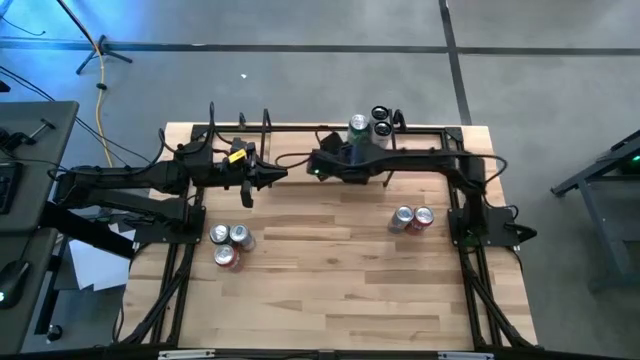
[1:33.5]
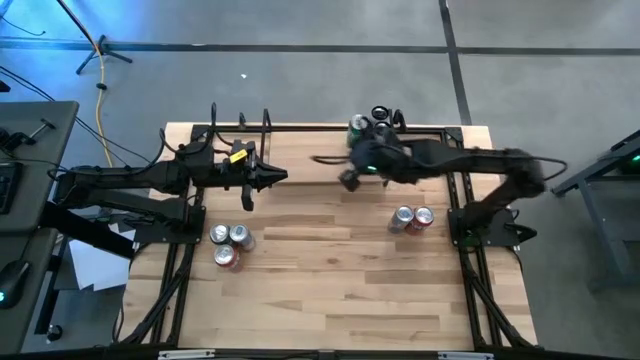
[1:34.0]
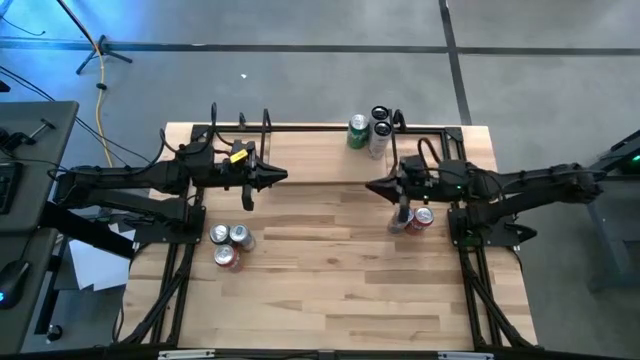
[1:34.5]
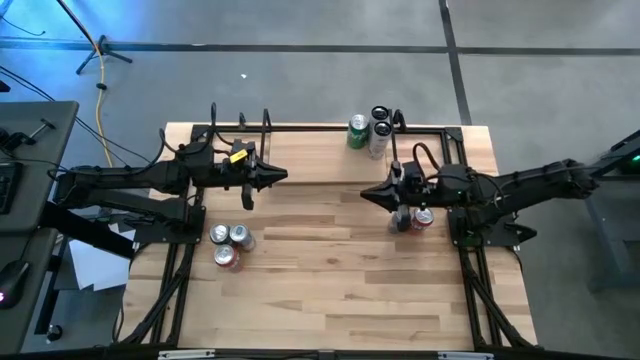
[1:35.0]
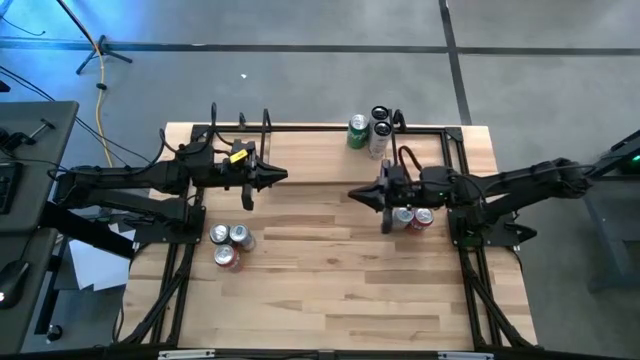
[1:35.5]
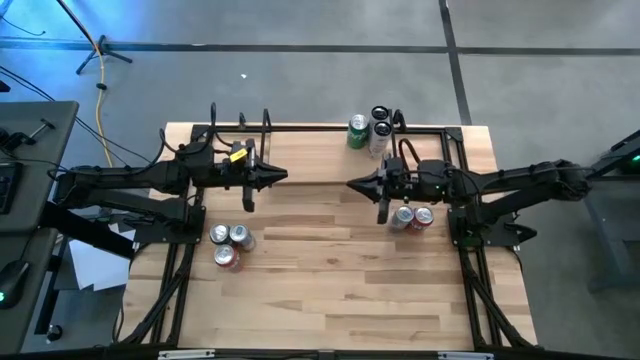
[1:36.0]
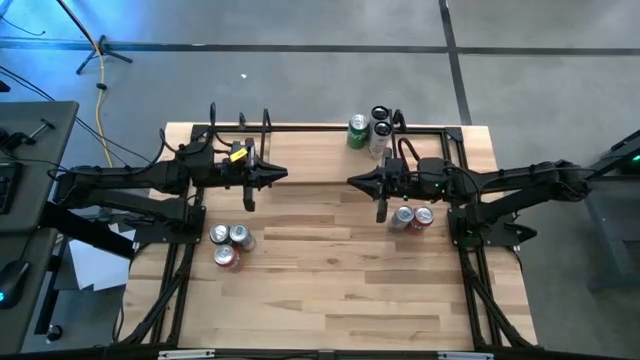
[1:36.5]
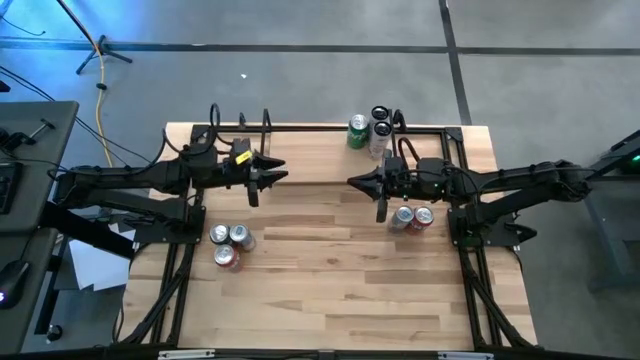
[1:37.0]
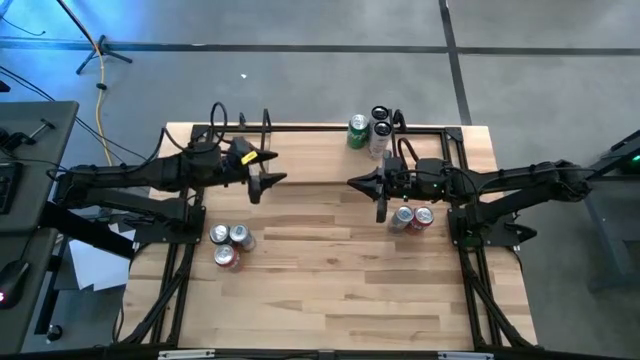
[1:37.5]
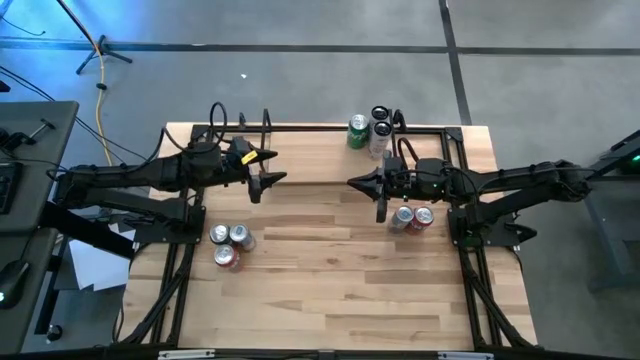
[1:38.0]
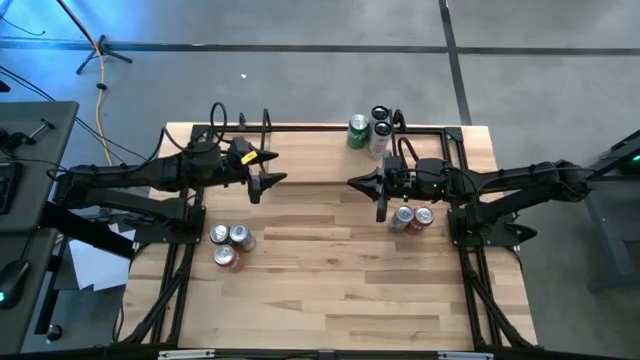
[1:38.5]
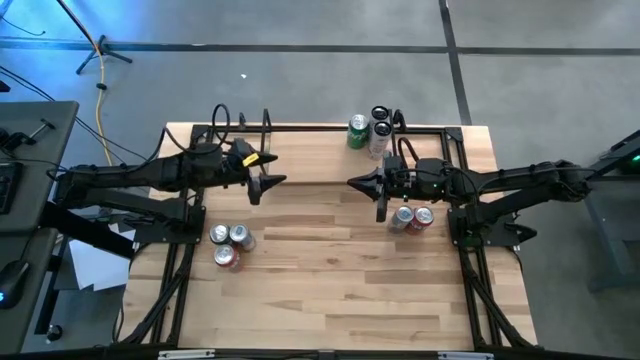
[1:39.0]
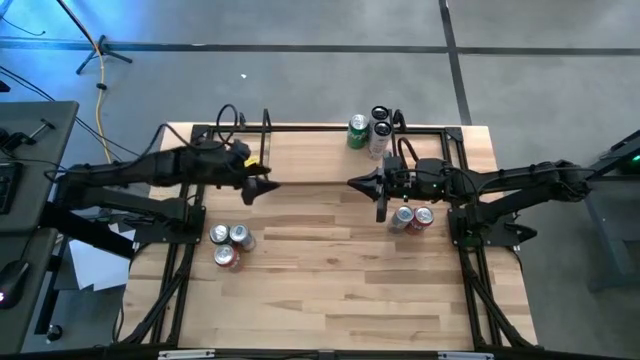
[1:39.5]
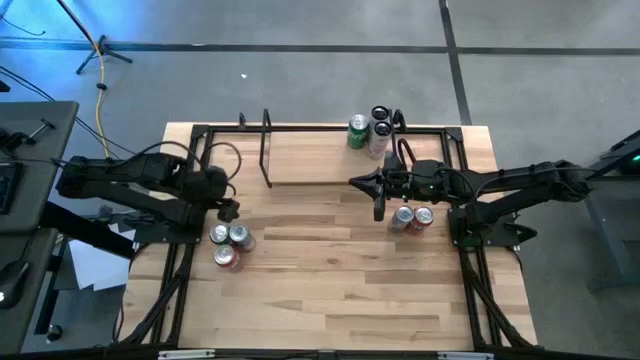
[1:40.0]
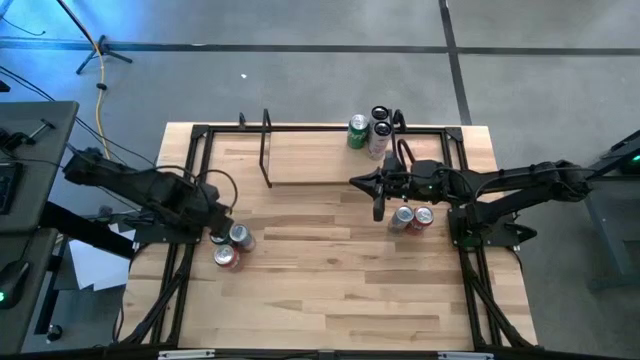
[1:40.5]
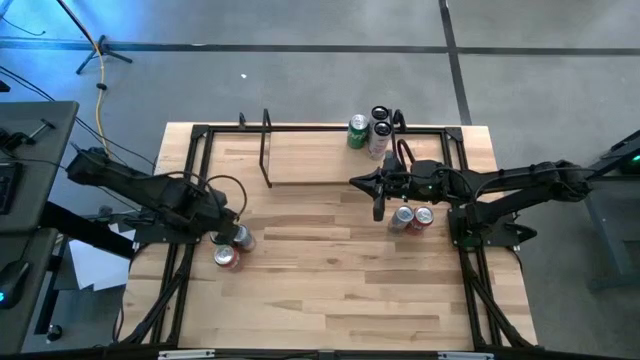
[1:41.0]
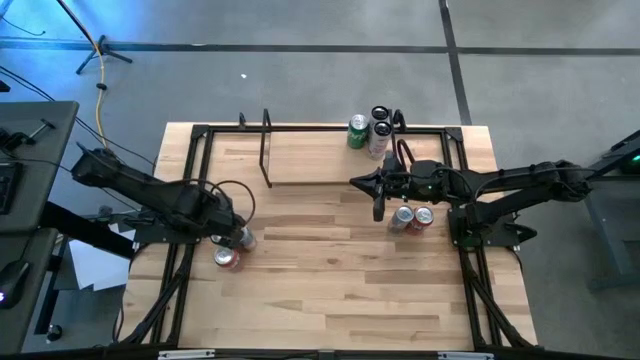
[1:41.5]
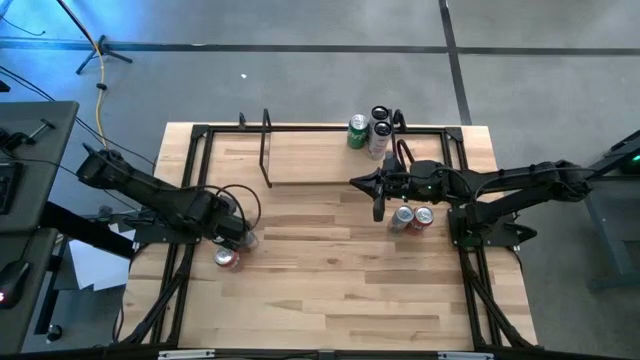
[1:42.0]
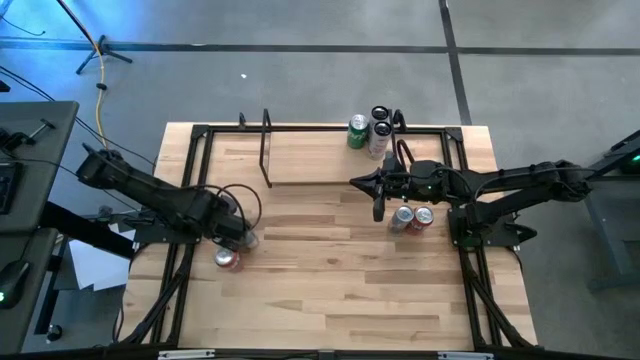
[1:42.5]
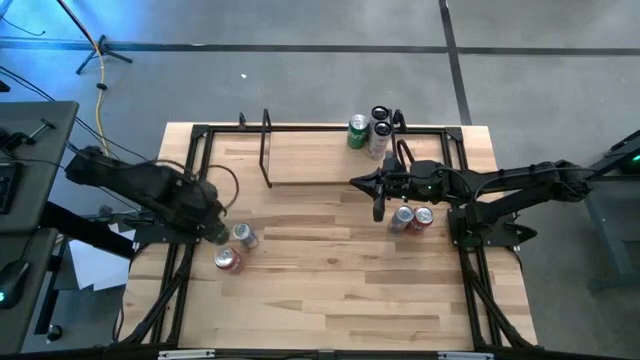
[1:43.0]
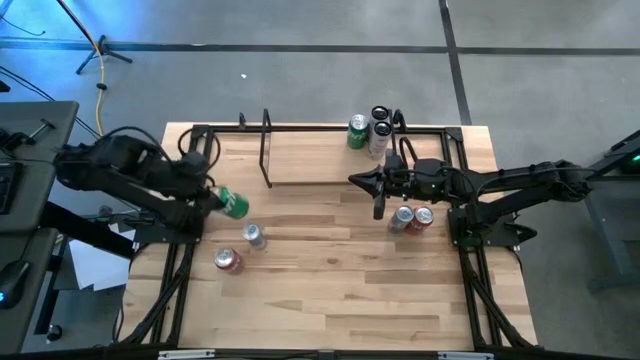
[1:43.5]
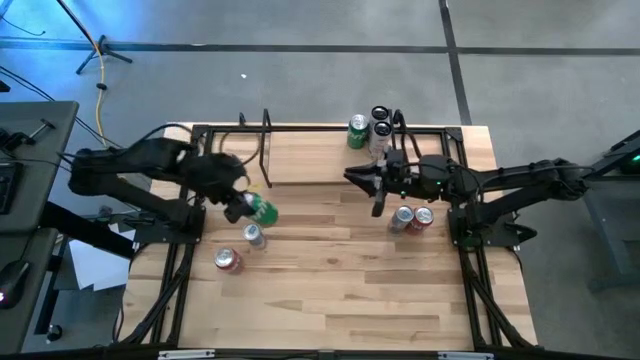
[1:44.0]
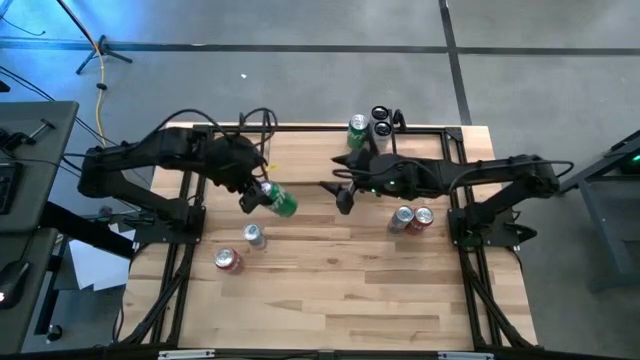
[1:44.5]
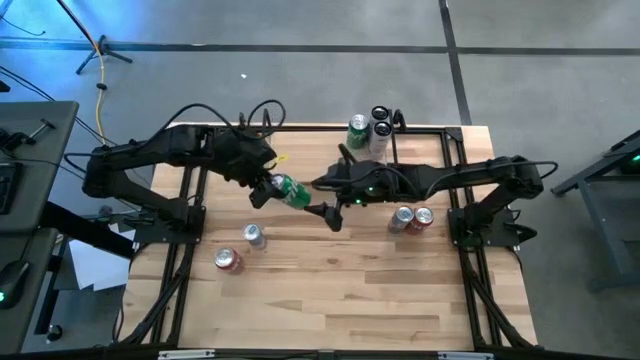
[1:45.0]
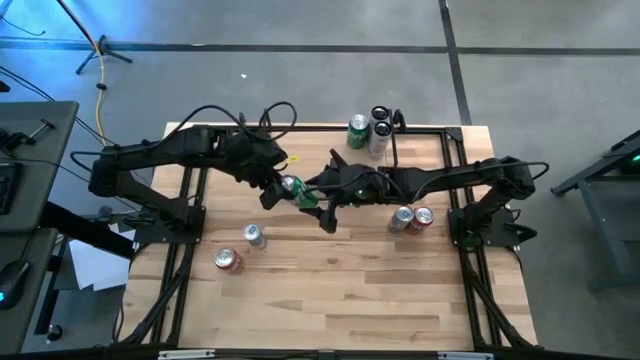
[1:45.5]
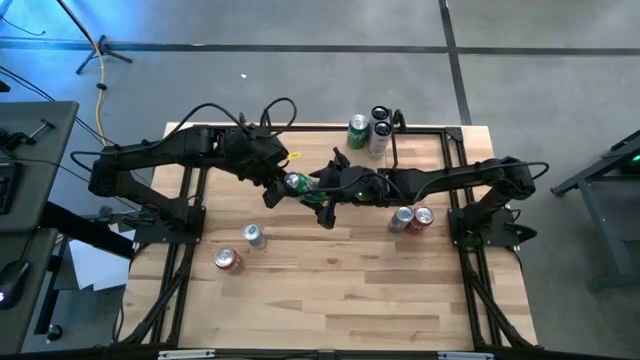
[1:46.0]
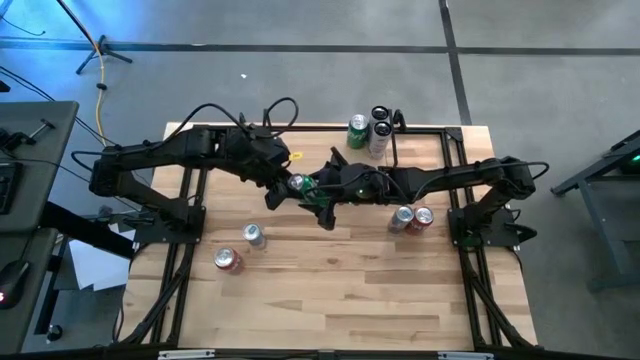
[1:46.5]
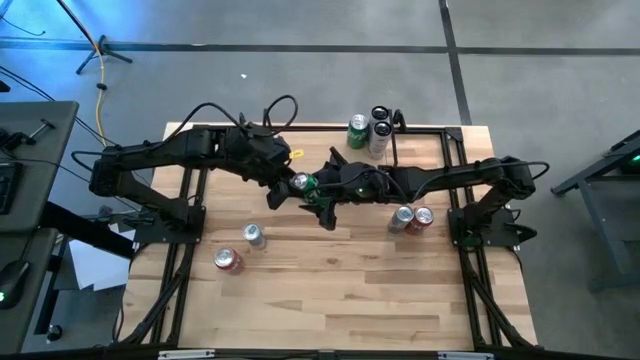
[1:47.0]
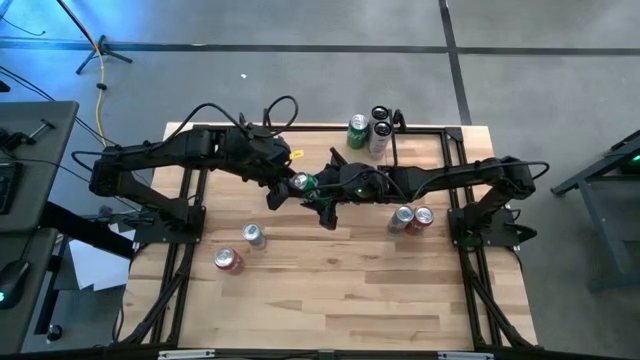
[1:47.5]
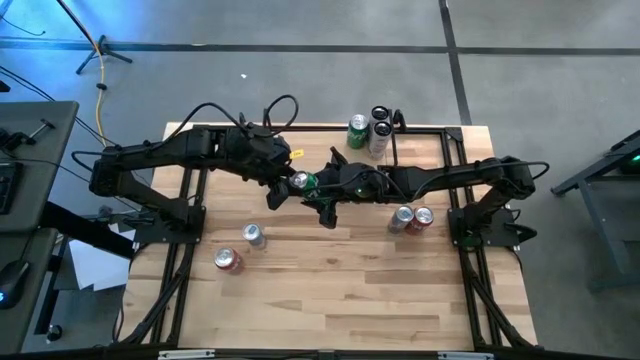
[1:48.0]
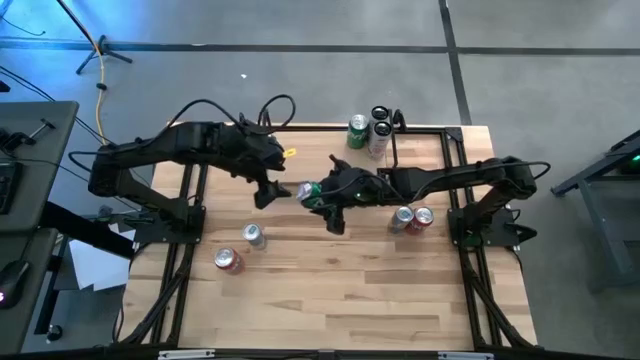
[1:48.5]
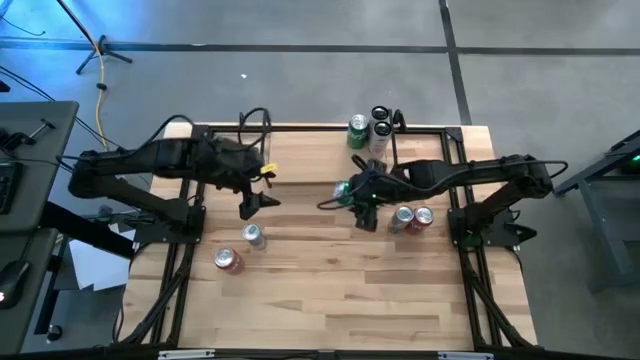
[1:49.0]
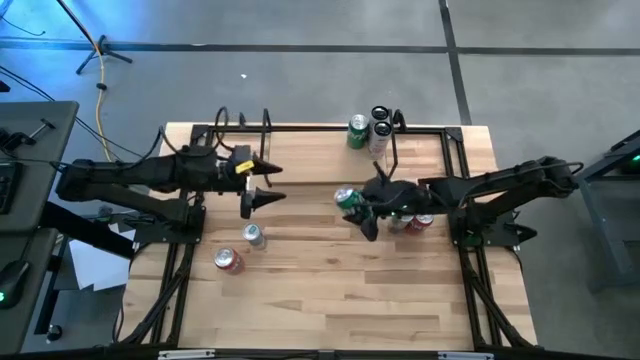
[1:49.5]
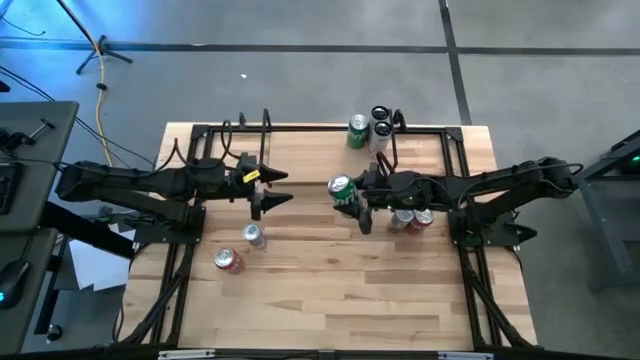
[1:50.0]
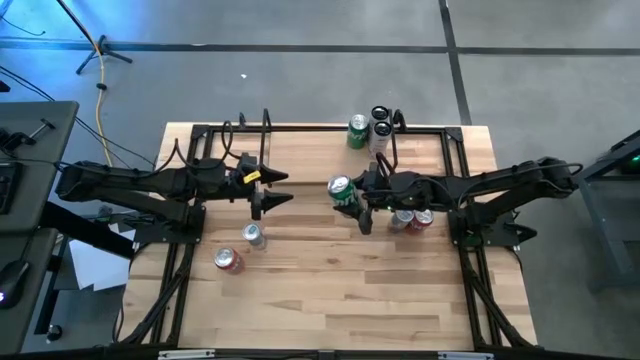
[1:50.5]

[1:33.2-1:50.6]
Task: Place canned beverage on shelf
Put the green soda can on the shelf and align it with the other green soda can

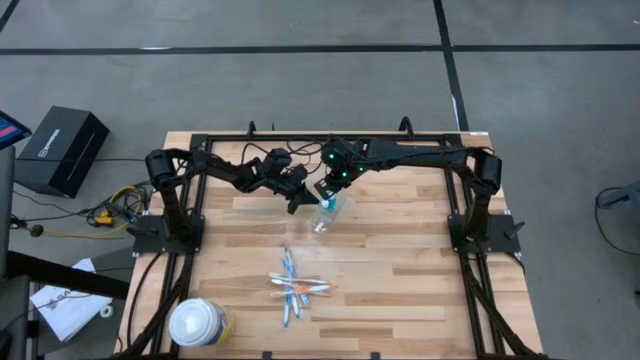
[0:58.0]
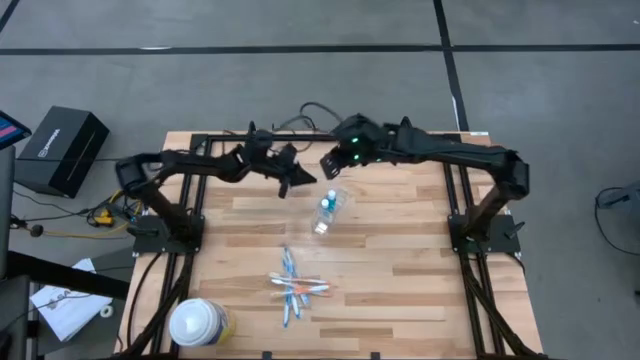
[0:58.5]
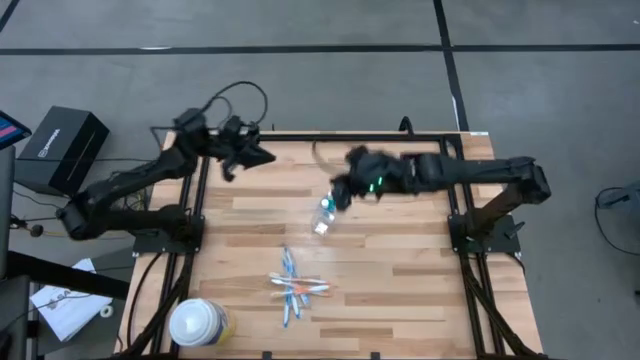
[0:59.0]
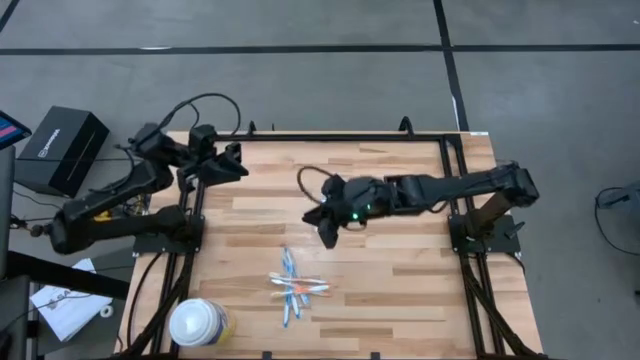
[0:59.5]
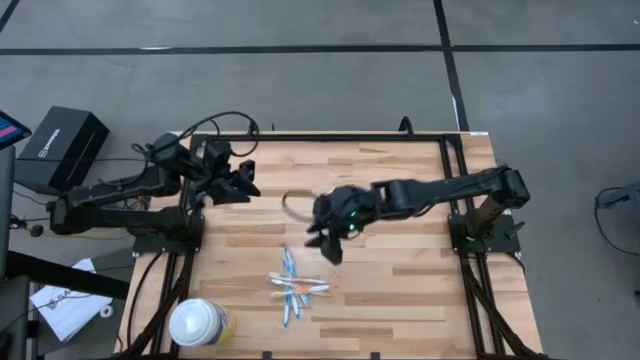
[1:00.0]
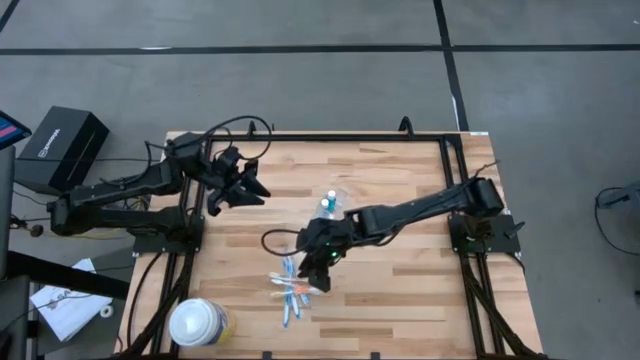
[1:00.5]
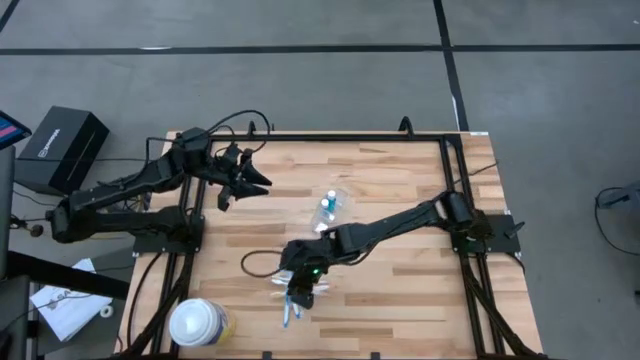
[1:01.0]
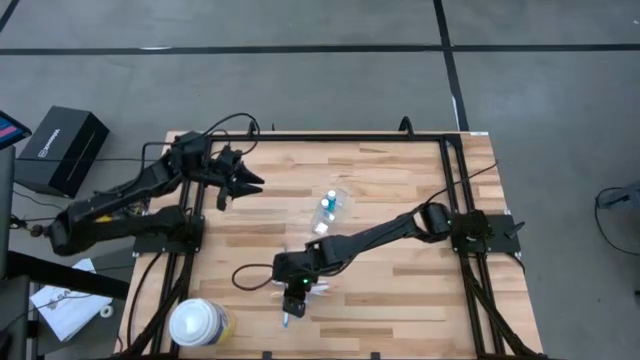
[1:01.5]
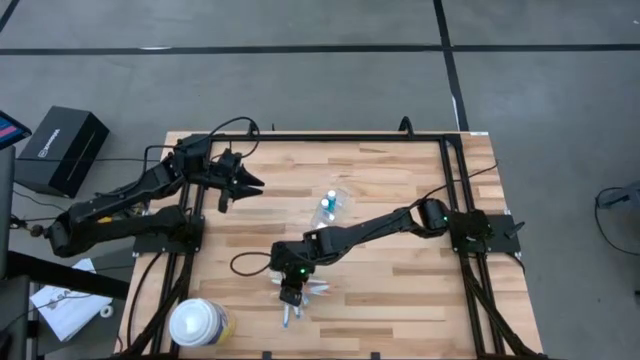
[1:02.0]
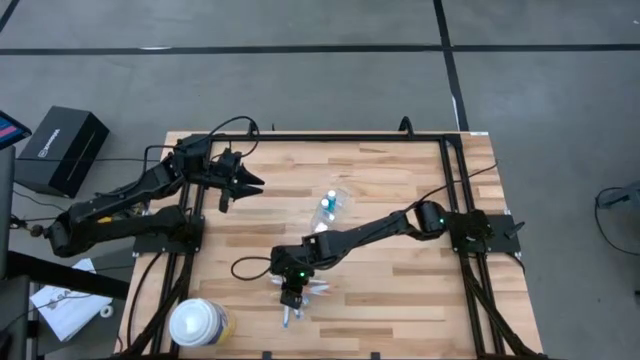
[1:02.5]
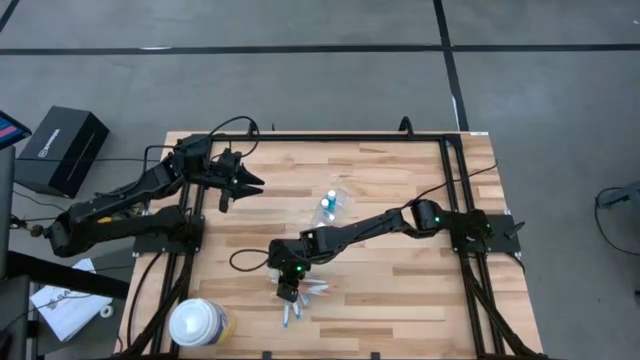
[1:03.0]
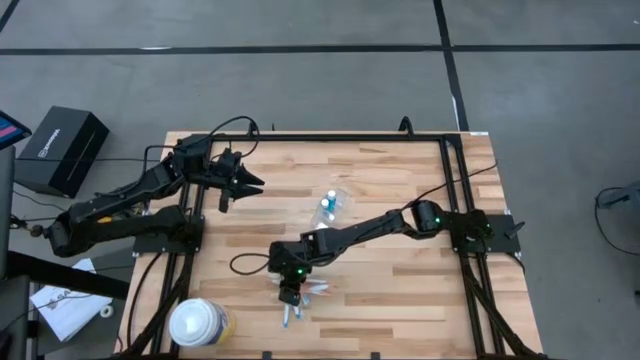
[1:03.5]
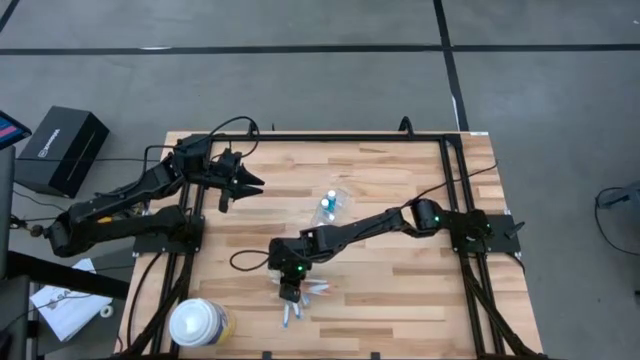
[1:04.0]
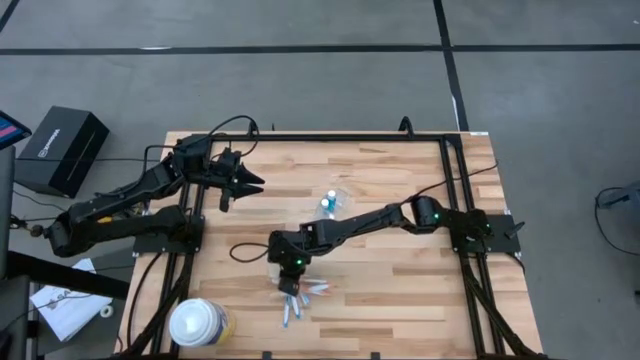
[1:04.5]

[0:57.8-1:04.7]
Task: Pick & Place toothbrushing station
Put the bottom orange toothbrush into the right section of the transparent organizer
